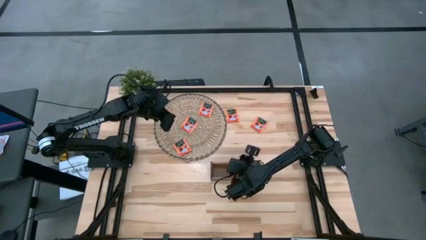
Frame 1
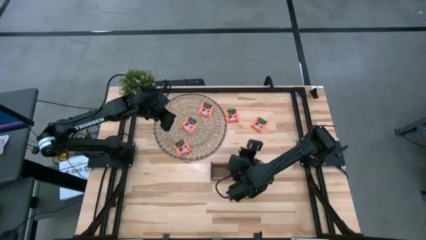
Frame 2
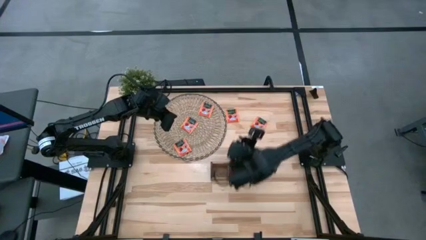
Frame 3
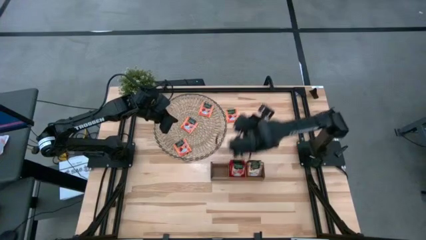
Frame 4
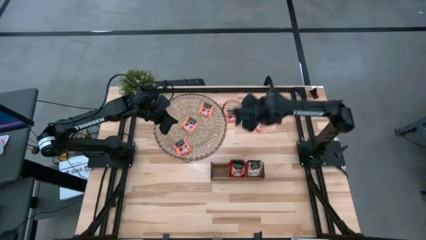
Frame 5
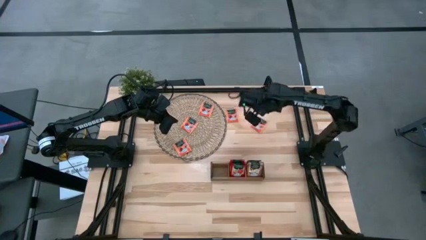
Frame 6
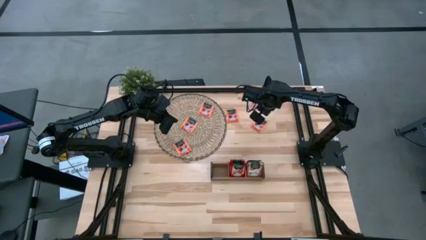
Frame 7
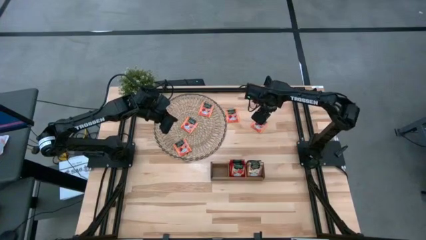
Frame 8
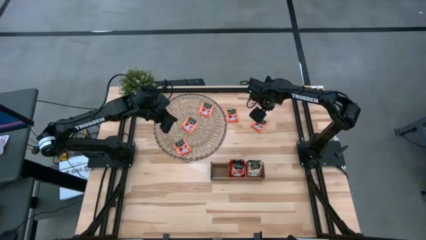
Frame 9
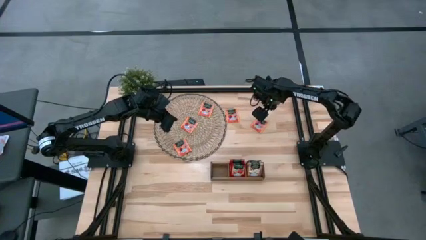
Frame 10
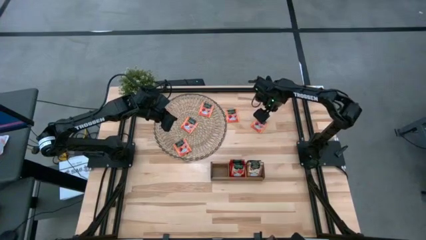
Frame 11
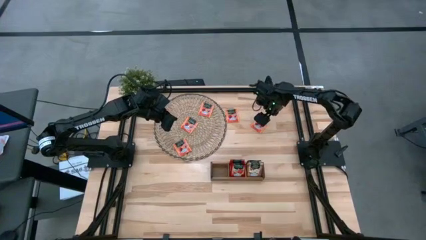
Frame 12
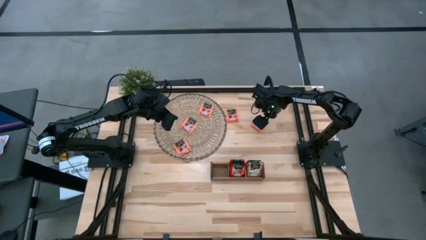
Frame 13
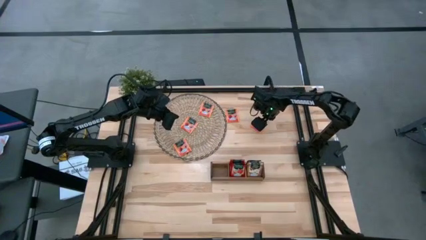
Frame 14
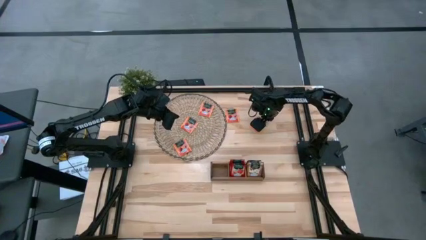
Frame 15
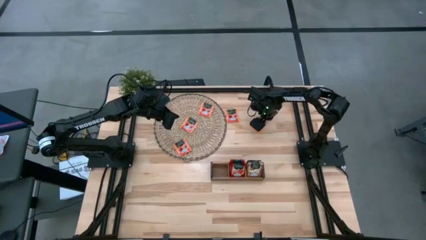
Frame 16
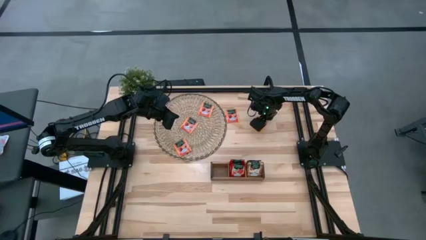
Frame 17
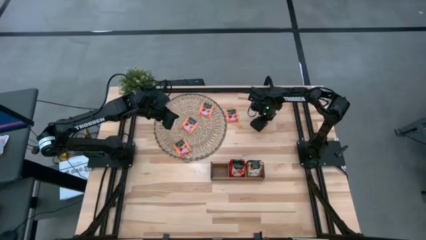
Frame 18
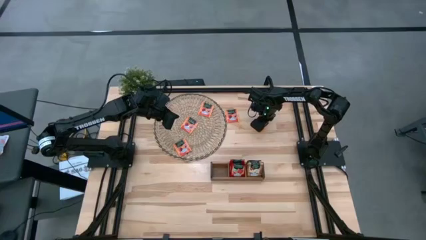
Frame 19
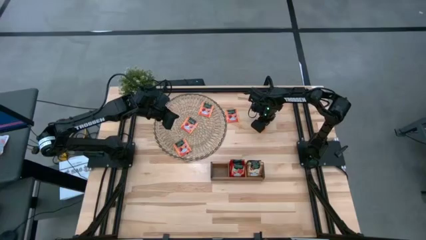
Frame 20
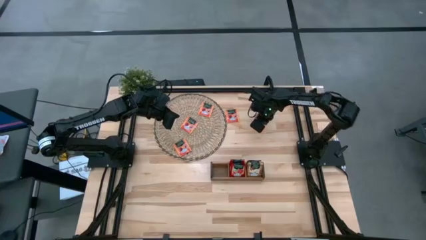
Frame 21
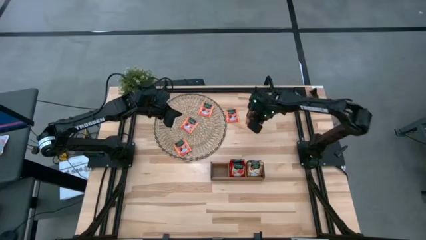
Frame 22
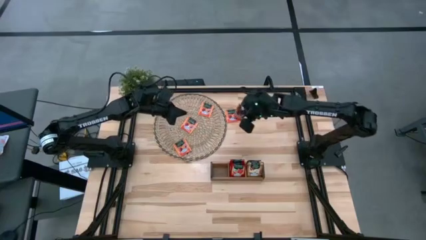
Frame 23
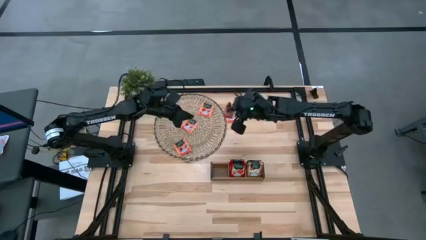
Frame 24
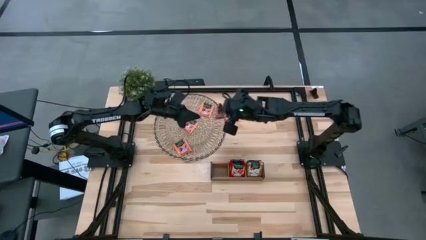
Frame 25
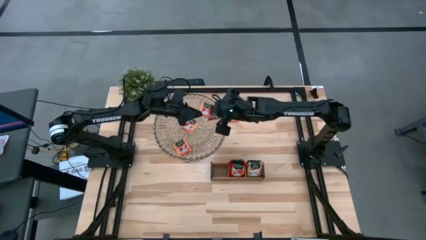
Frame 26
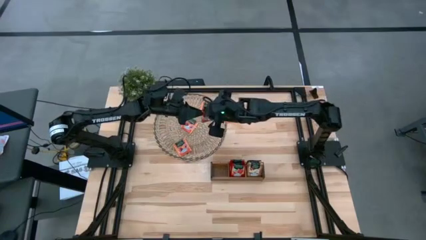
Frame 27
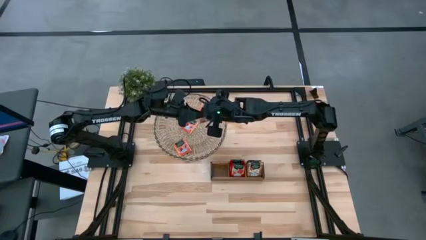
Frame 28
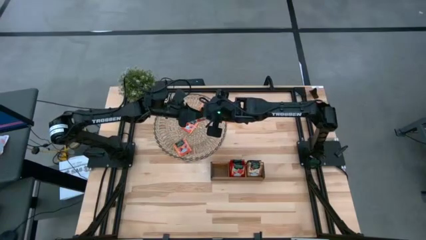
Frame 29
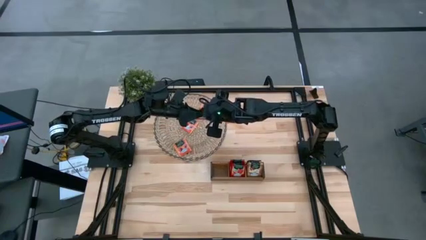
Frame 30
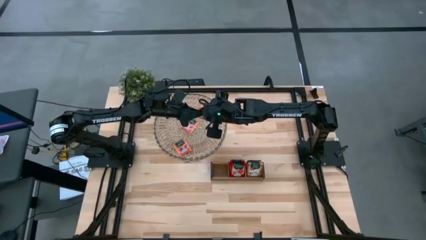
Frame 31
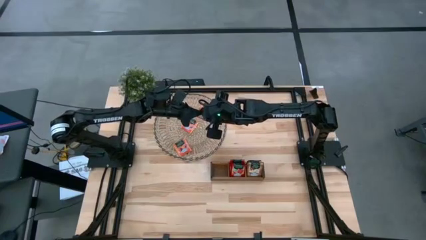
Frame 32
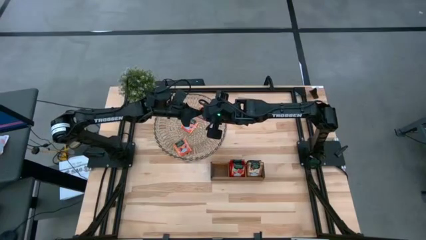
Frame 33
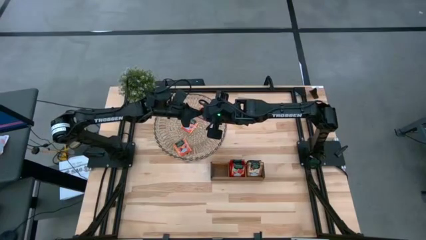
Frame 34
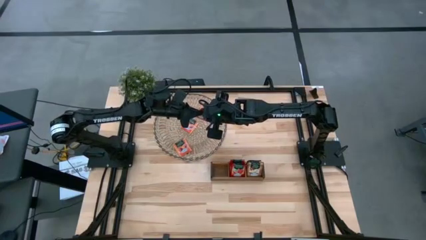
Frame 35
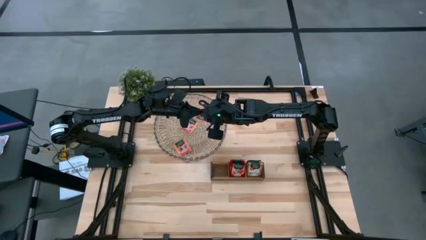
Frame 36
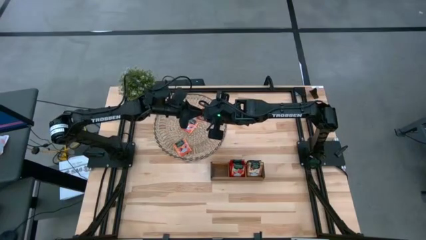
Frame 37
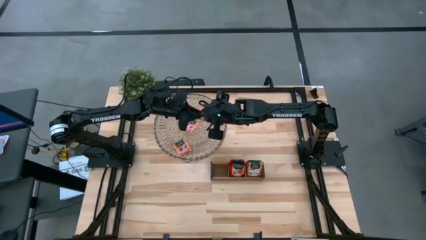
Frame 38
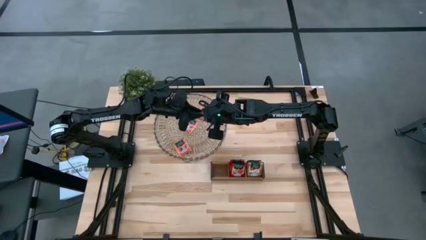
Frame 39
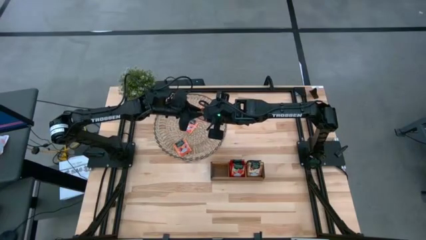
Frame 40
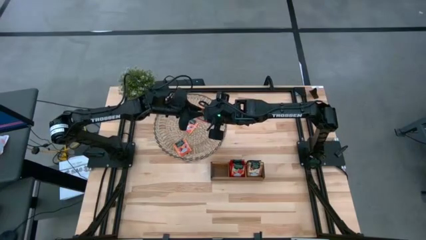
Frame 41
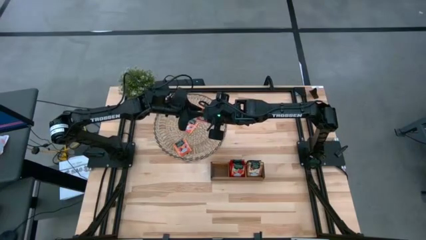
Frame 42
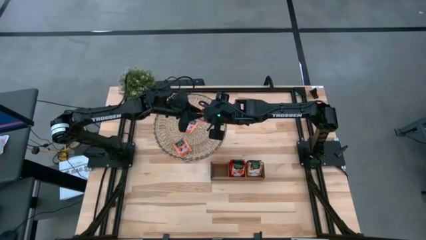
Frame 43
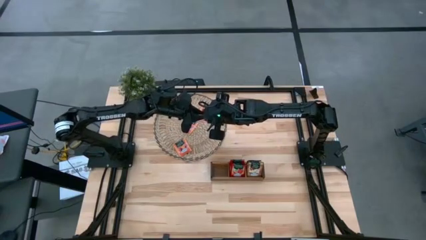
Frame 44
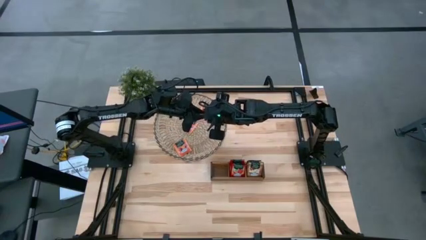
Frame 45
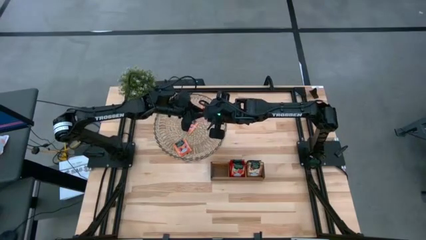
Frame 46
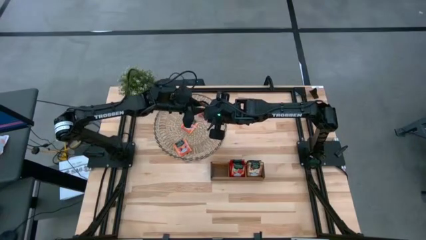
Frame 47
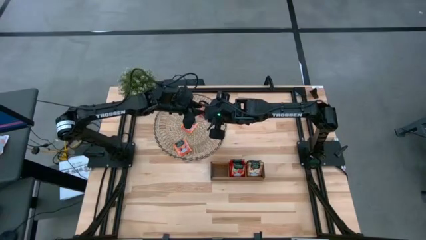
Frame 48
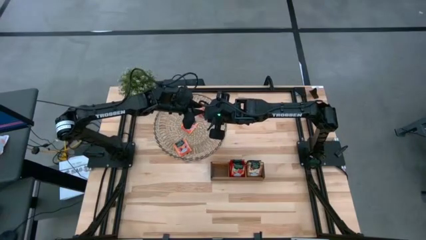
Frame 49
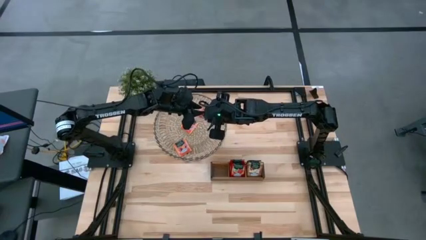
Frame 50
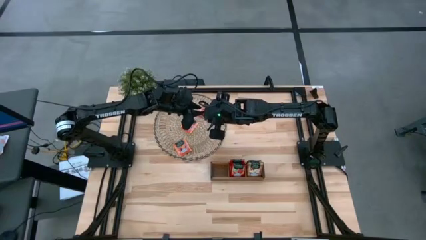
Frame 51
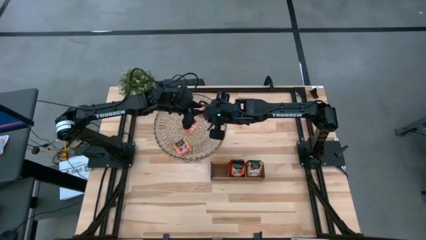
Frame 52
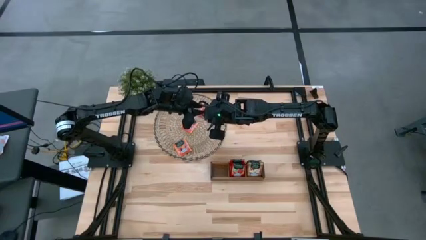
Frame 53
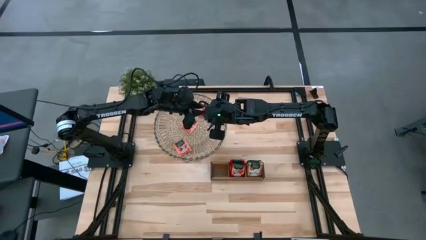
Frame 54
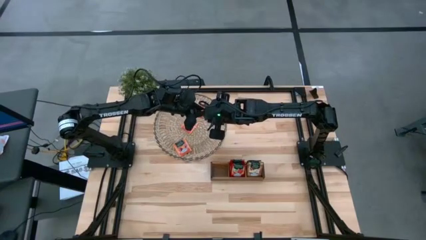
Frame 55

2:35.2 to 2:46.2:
Task: Pick & Place Tea
Put the orange tea bag into the left slot of the wooden organizer

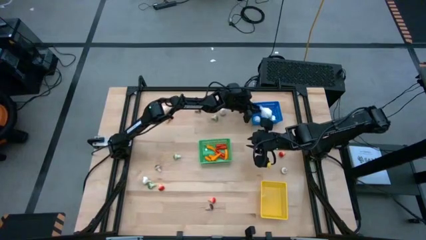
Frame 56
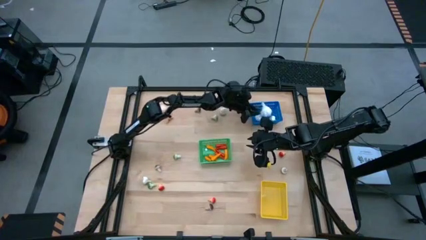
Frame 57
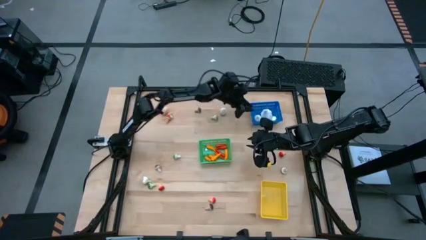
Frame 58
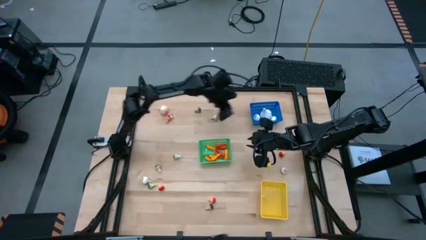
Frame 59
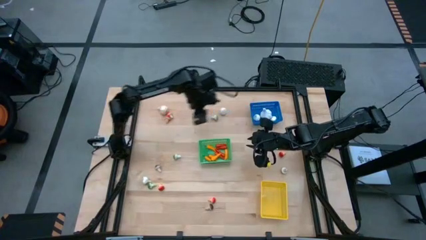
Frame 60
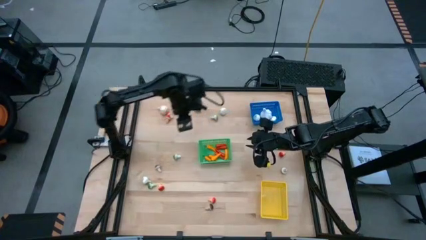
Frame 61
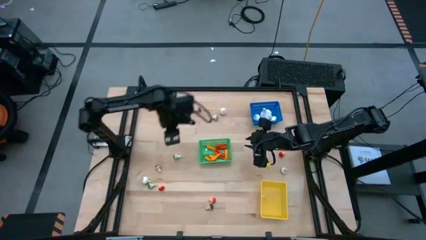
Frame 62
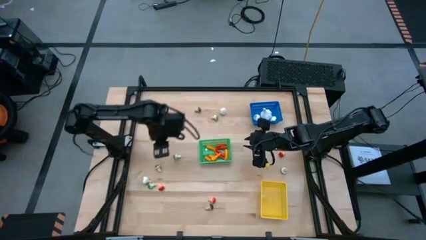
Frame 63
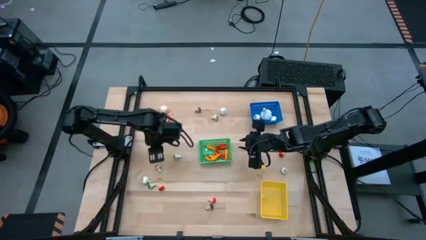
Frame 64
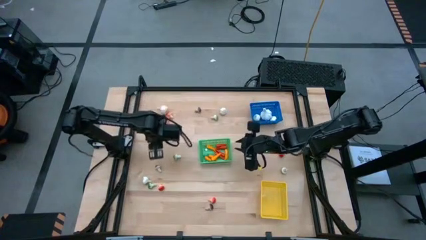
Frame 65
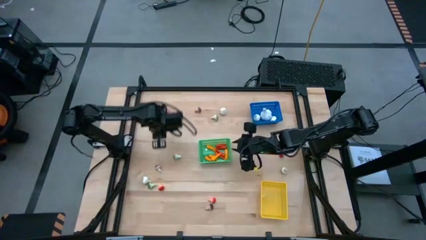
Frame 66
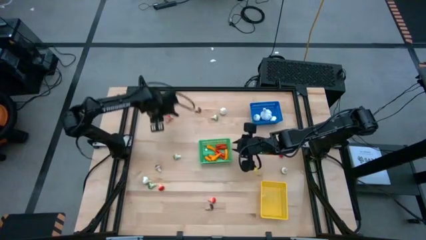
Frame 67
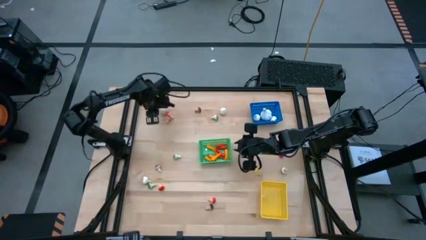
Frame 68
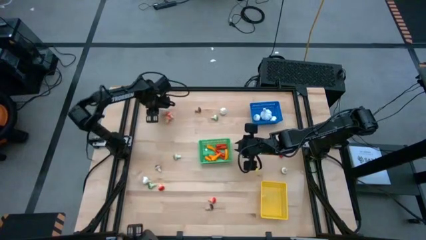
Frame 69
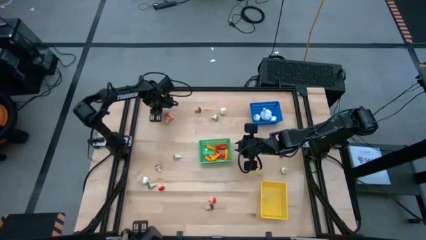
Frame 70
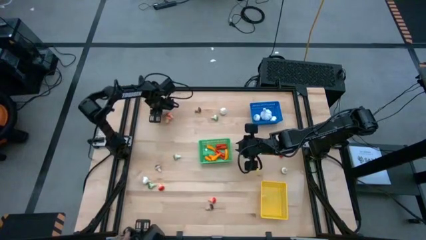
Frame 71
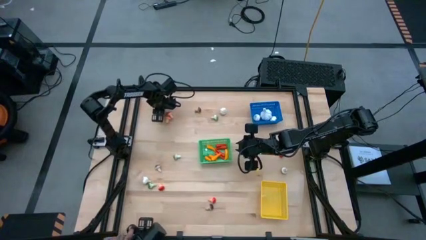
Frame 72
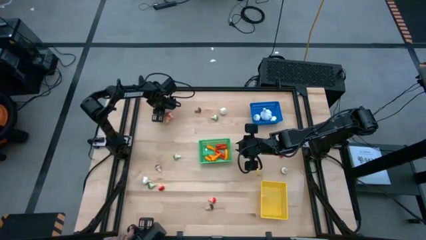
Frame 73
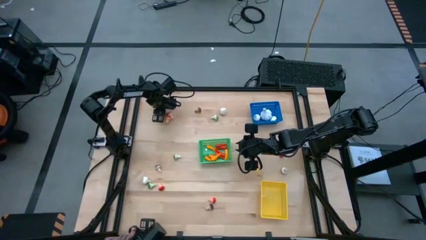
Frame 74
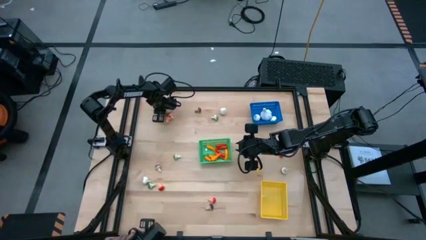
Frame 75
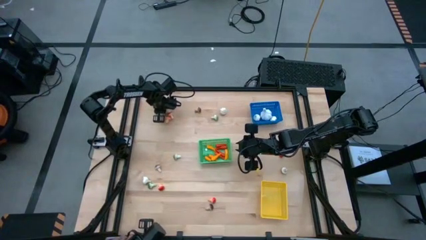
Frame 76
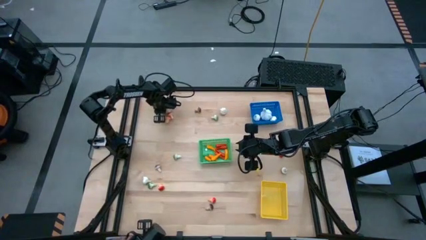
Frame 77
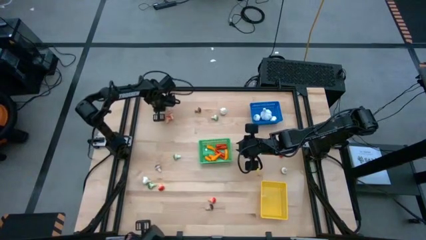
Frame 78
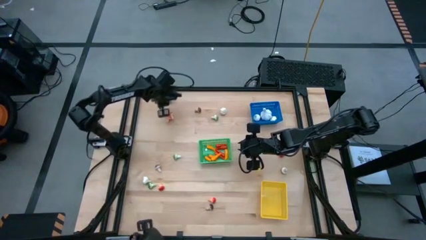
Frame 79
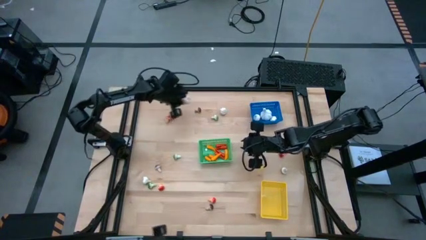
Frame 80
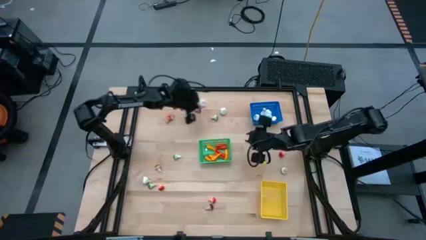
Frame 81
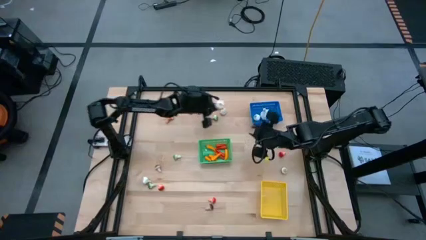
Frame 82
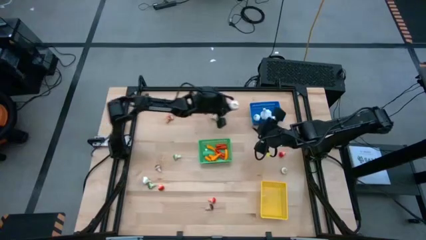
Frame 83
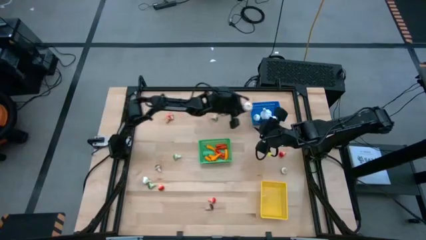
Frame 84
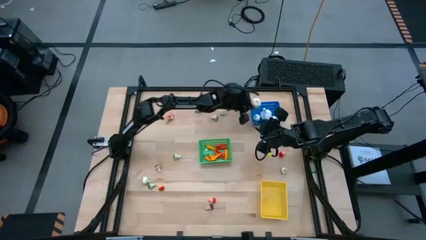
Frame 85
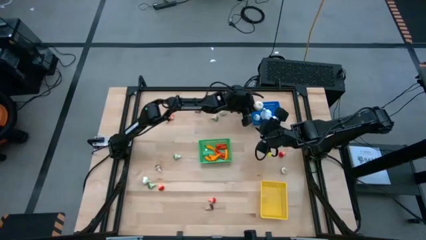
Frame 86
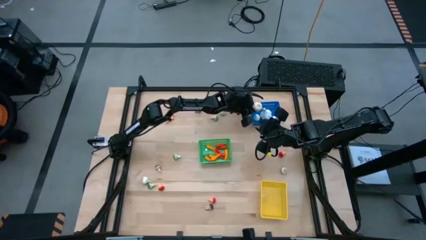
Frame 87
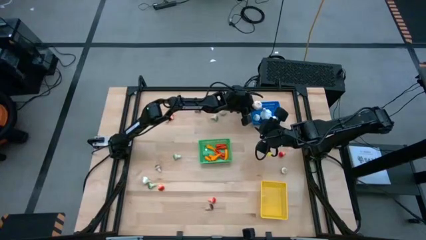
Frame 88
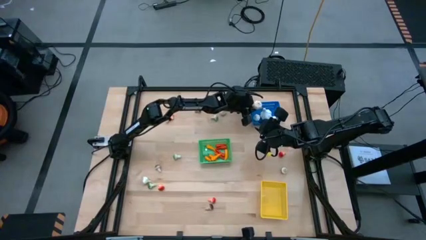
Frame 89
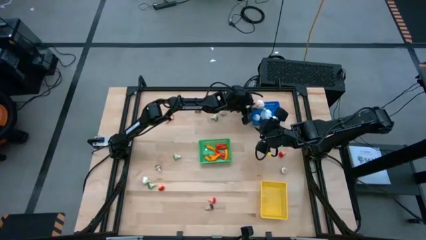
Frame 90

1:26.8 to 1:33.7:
Task: Sort produce into baskets
Put the garlic into the blue bin
